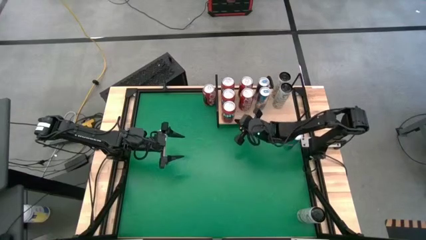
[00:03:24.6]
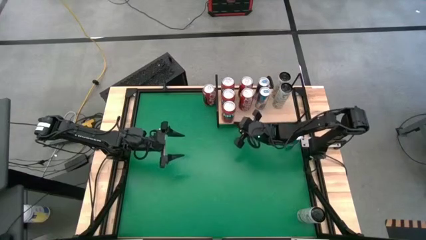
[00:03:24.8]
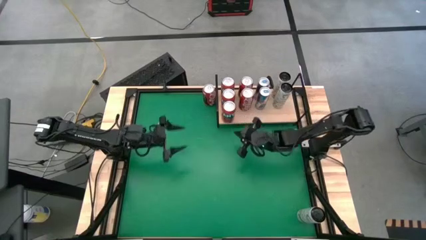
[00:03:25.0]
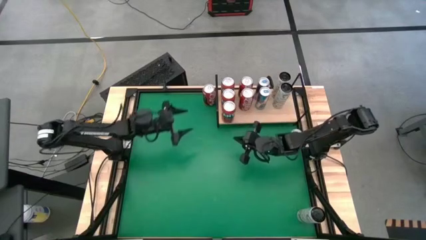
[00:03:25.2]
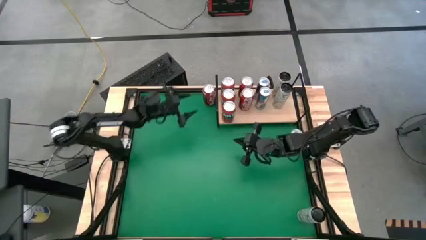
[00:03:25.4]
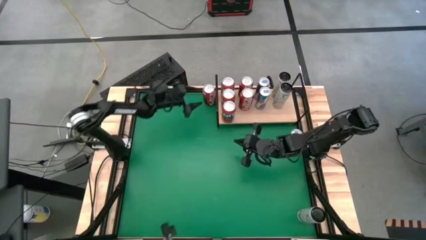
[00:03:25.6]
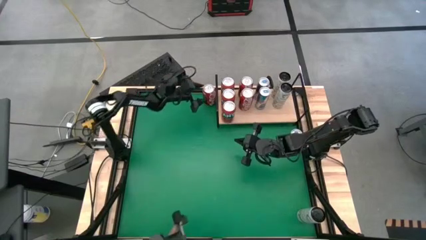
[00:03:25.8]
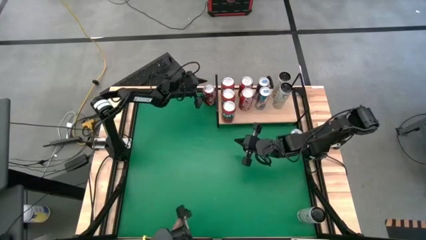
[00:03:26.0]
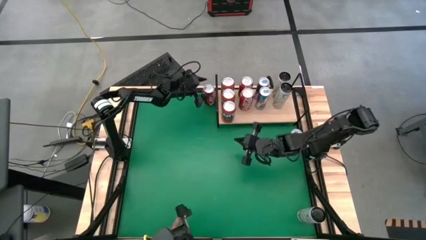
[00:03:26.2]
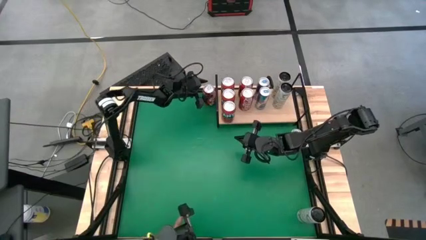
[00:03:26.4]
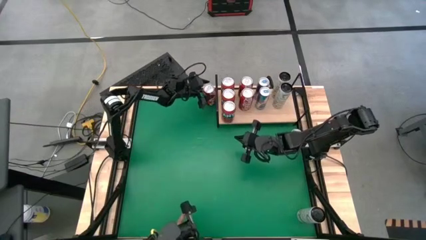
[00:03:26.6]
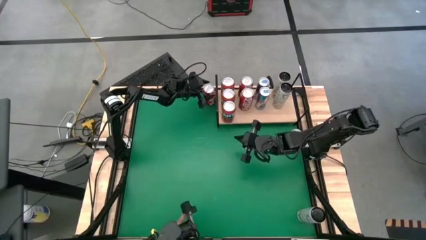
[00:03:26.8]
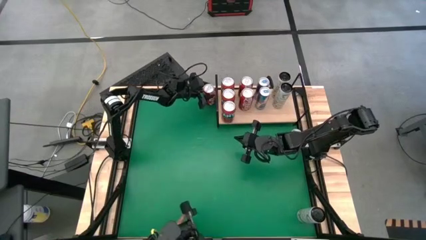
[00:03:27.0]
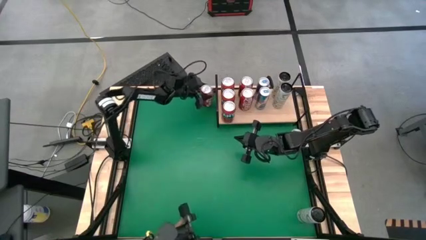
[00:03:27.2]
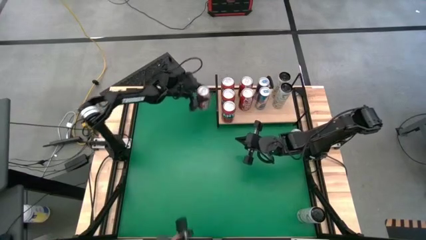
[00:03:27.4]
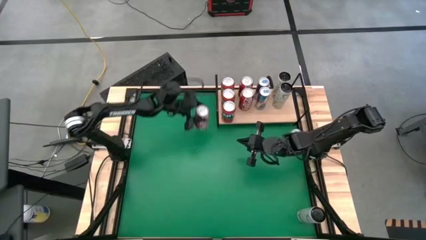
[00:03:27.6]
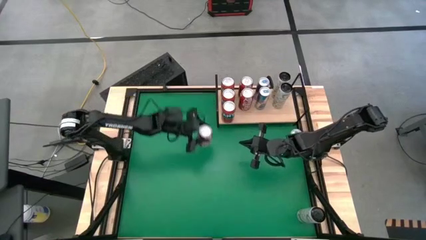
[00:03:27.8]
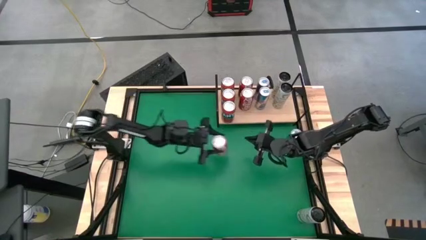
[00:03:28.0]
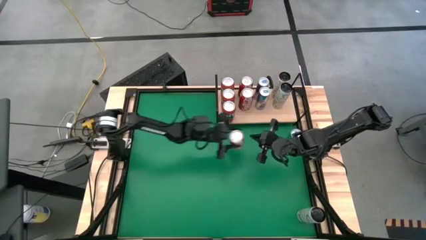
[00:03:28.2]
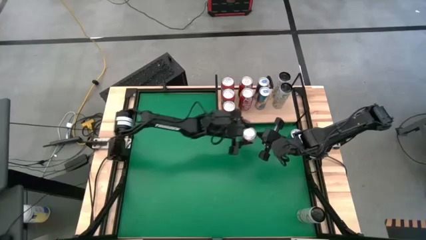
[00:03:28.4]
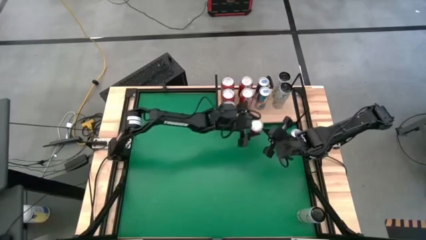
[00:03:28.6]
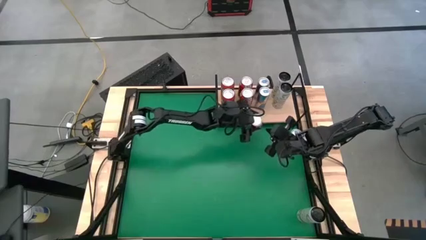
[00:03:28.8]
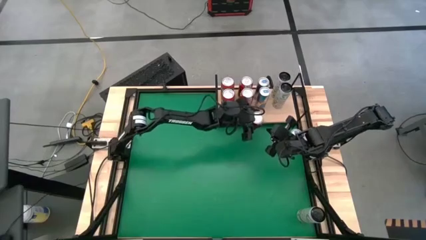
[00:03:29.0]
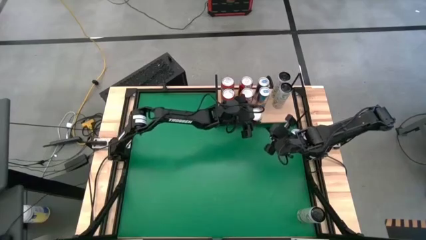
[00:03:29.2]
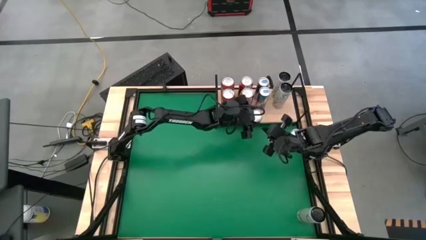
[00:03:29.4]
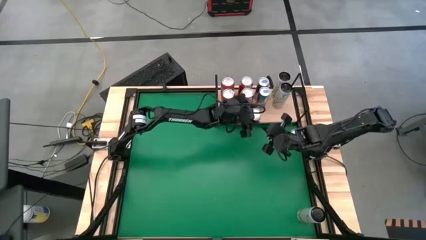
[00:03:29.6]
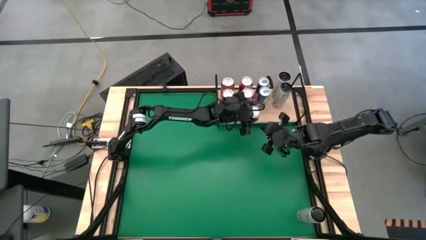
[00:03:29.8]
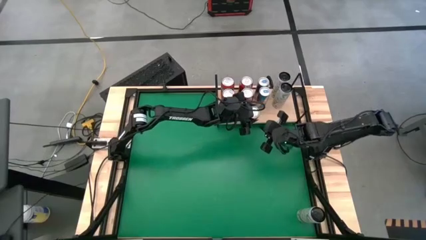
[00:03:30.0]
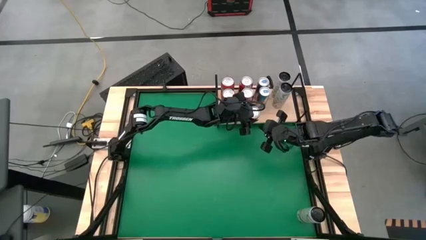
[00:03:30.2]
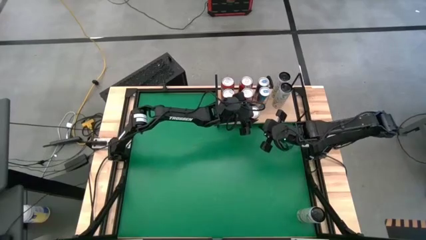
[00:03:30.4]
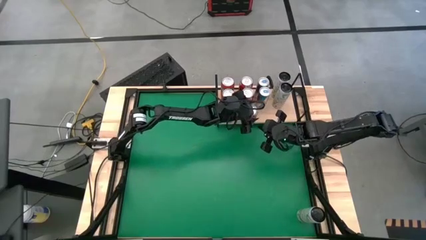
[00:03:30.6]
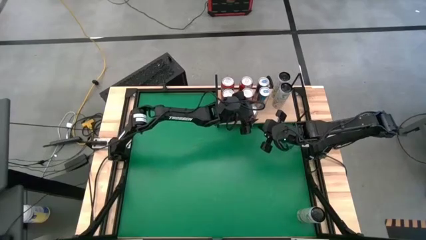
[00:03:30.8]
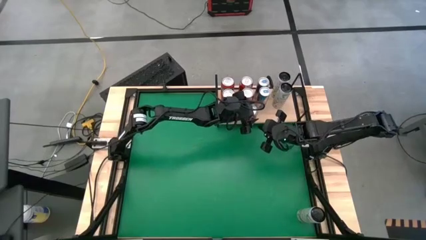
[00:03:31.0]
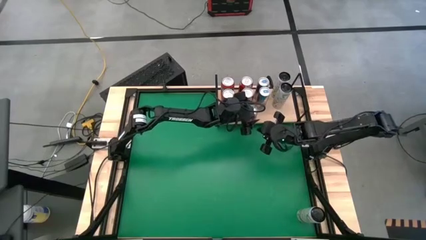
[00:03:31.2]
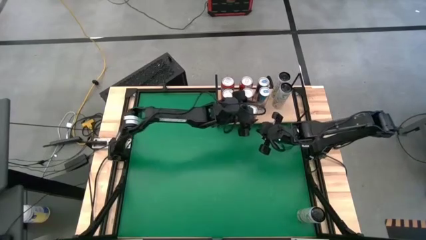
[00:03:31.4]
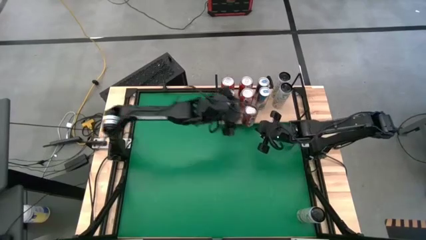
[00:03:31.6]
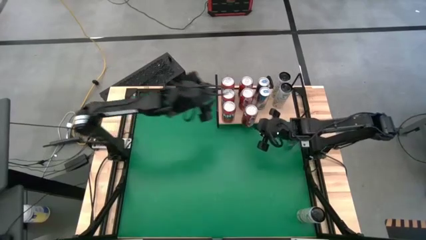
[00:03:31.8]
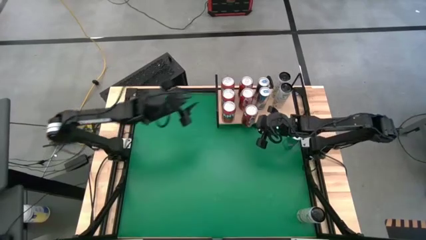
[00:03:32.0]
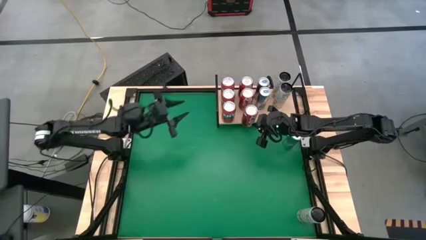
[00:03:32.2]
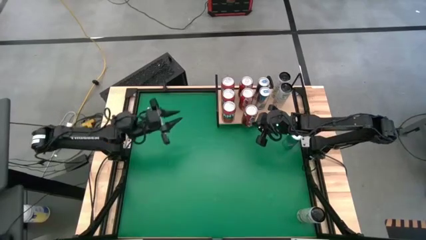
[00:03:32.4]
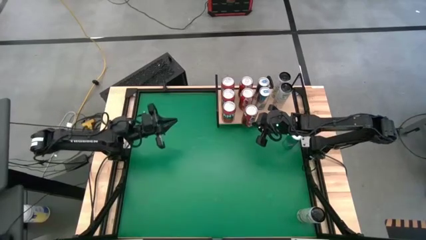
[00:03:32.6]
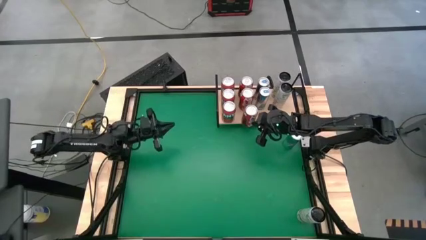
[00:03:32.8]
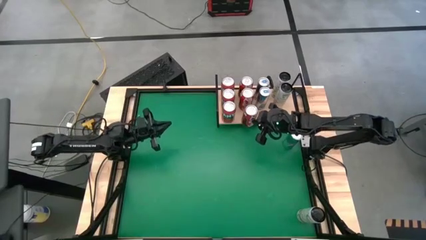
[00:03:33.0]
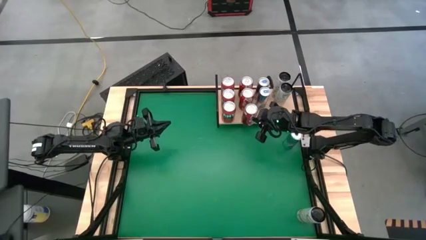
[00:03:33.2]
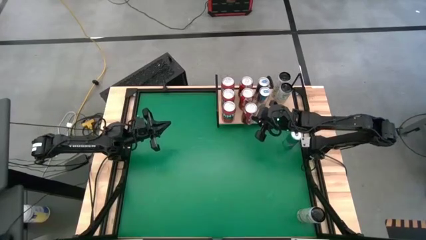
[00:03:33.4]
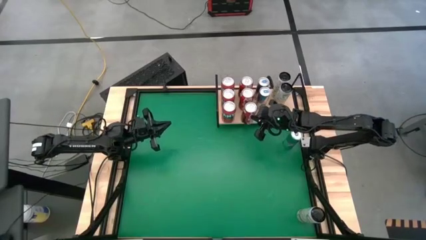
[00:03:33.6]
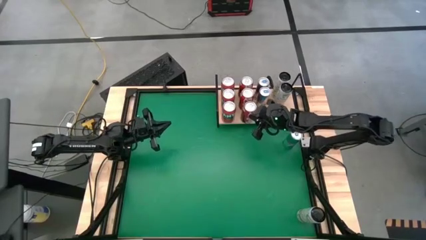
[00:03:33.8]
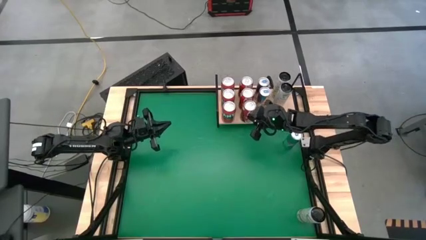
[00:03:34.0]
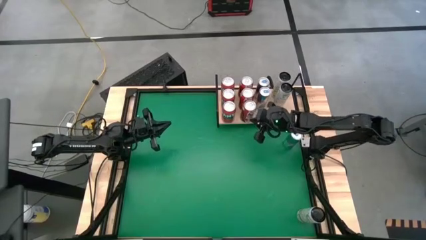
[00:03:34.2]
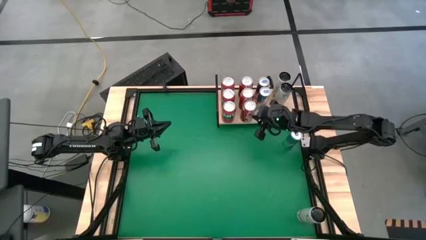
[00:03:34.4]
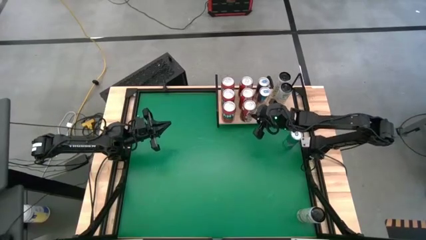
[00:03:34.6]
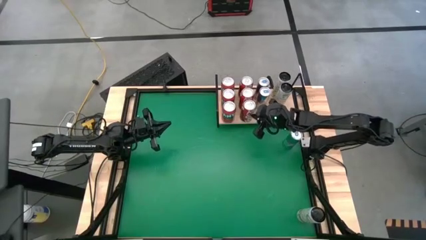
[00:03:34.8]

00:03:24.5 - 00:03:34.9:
Task: Place canned beverage on shelf
Put the red white soda can on the shelf aligned with the other red white soda cans
